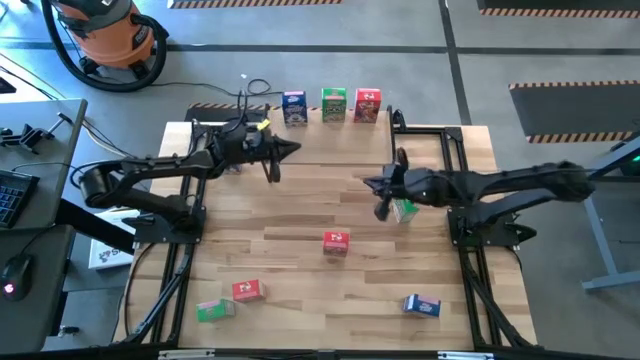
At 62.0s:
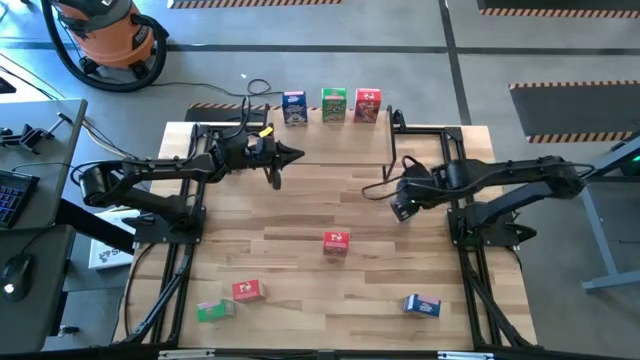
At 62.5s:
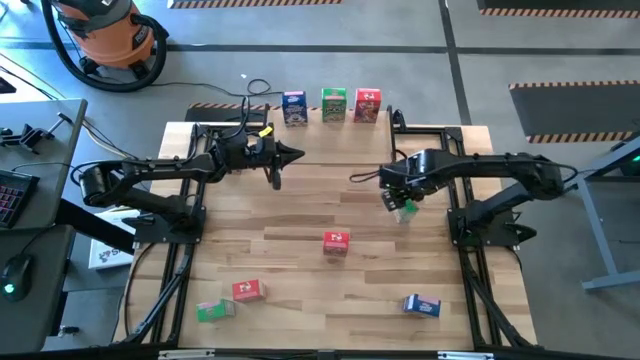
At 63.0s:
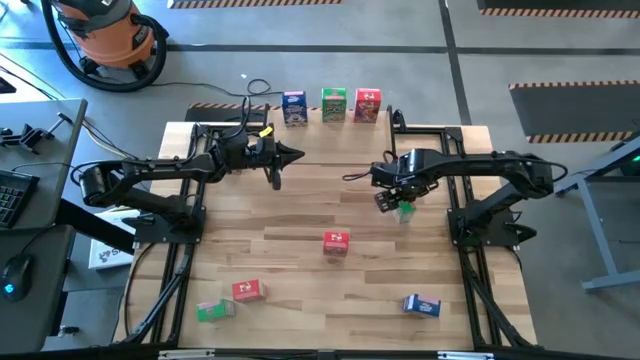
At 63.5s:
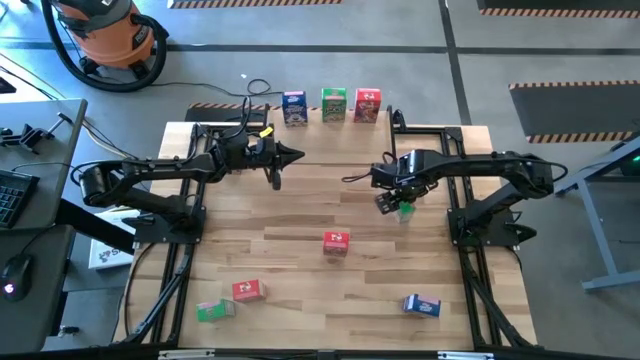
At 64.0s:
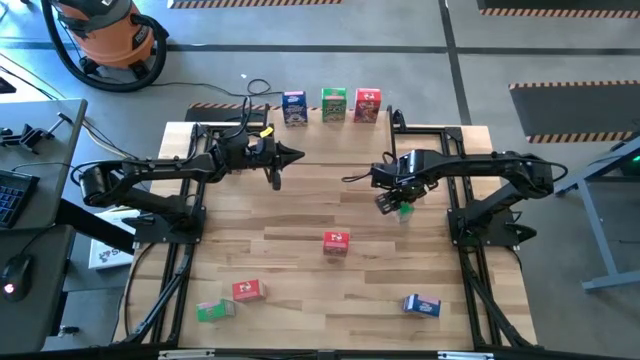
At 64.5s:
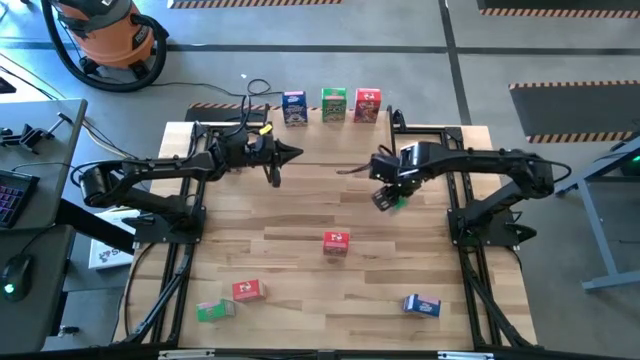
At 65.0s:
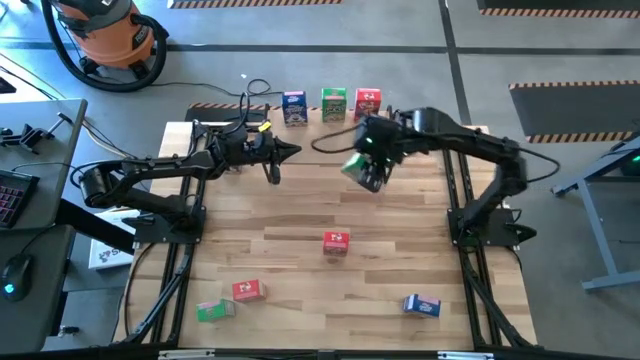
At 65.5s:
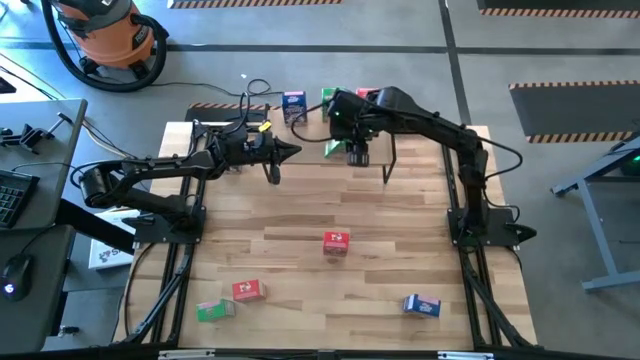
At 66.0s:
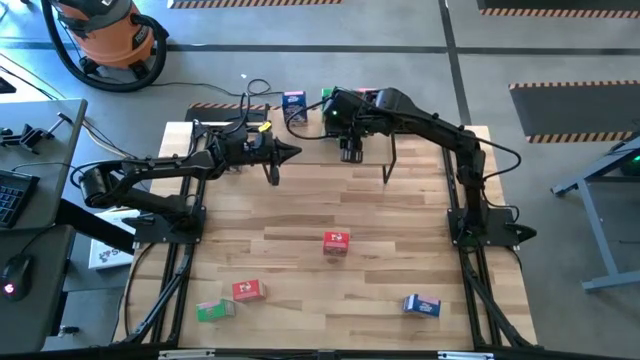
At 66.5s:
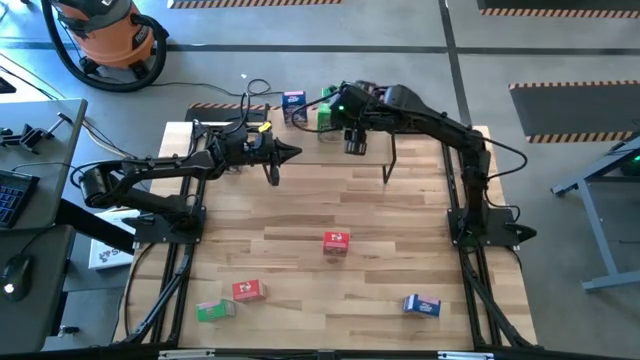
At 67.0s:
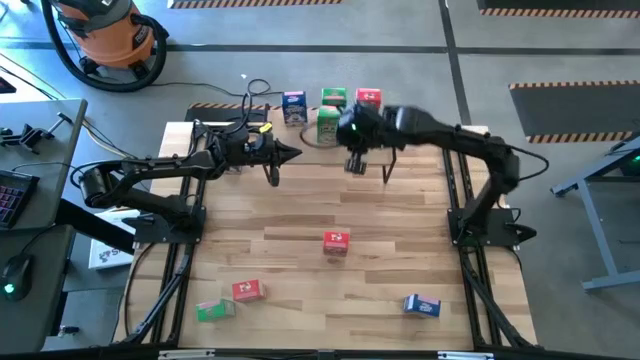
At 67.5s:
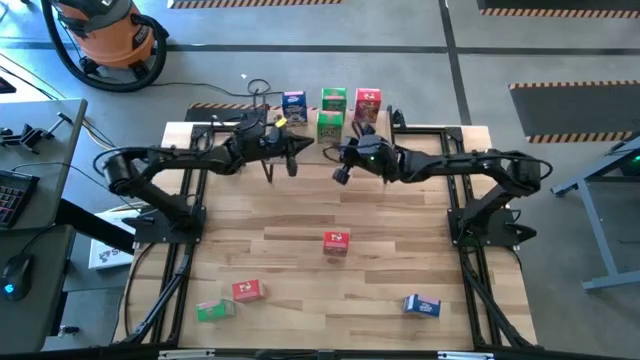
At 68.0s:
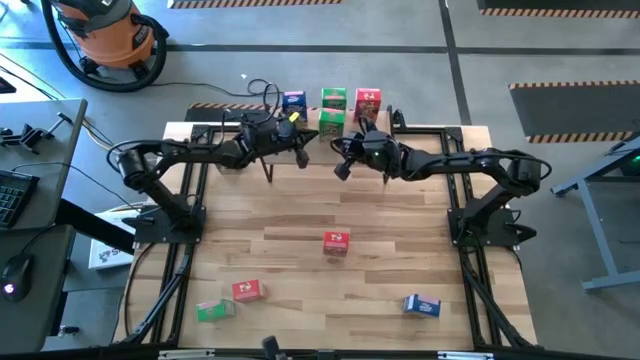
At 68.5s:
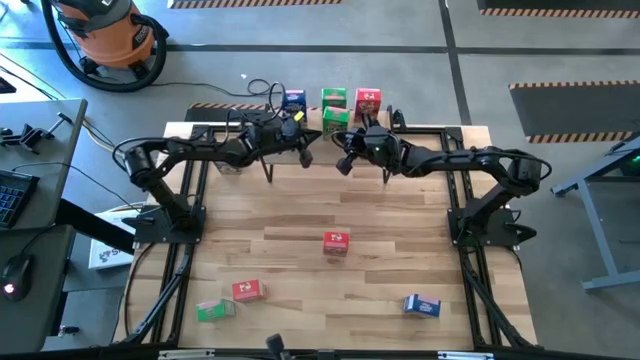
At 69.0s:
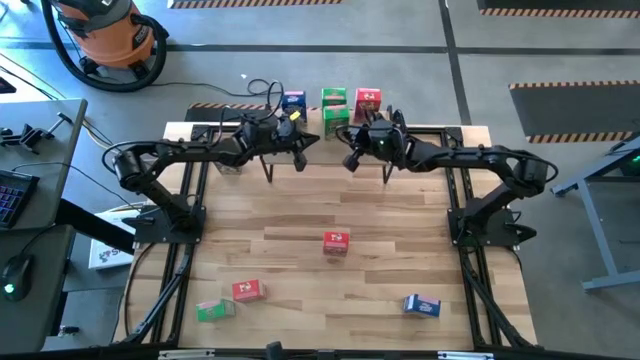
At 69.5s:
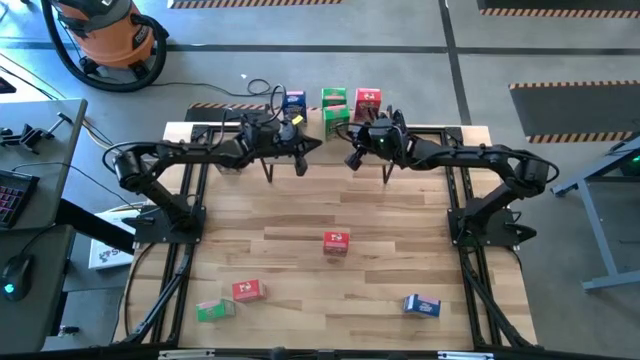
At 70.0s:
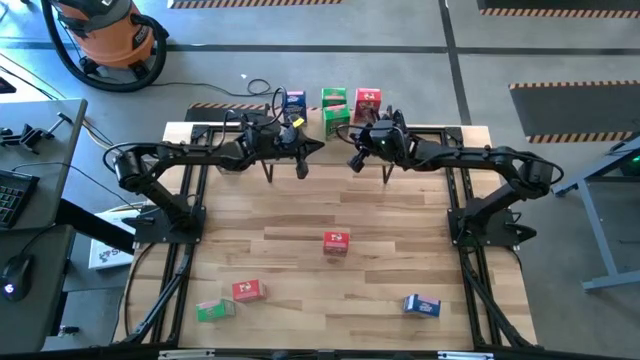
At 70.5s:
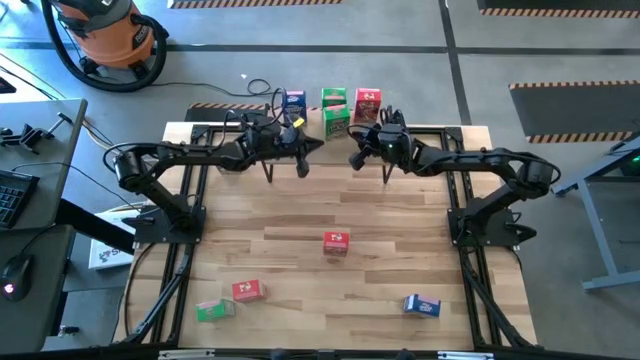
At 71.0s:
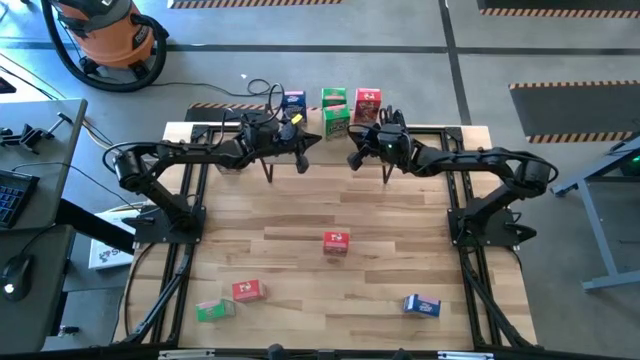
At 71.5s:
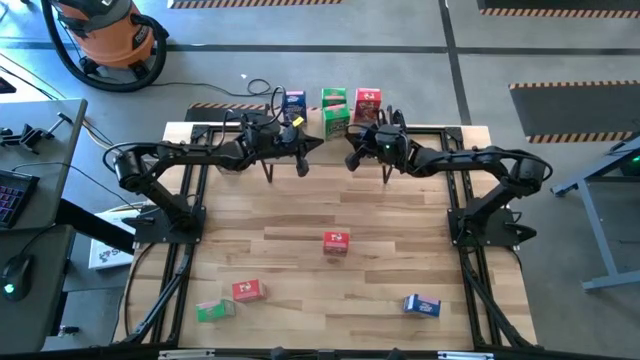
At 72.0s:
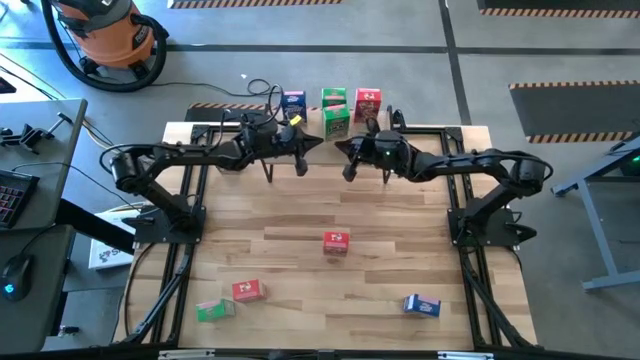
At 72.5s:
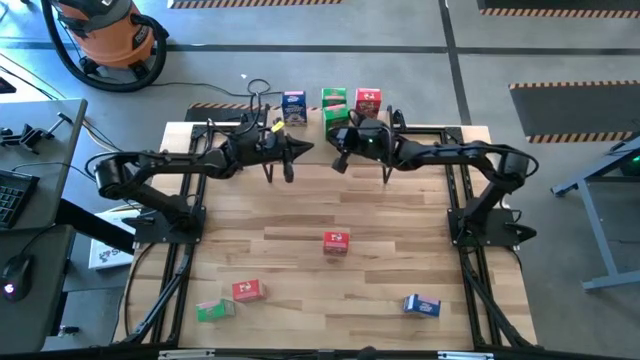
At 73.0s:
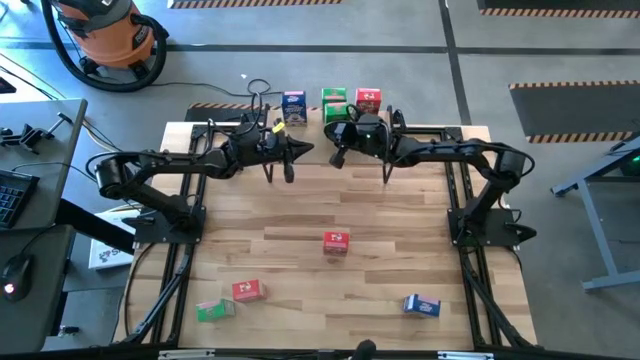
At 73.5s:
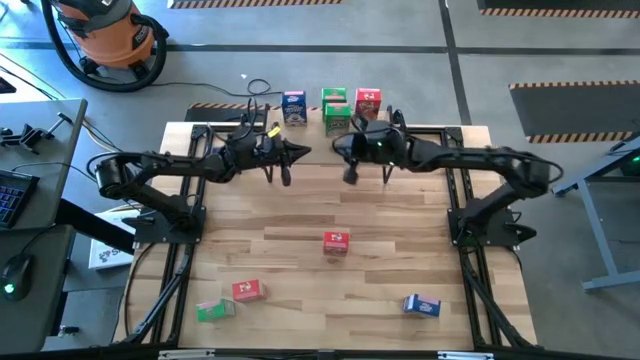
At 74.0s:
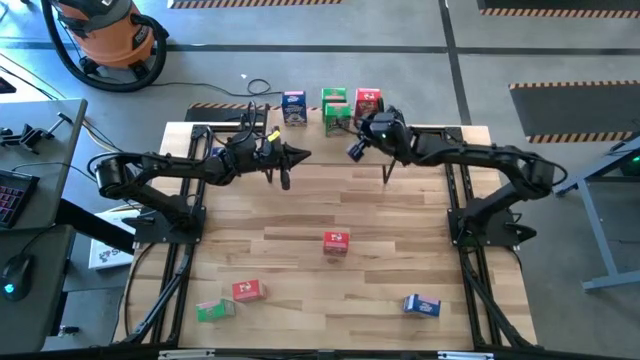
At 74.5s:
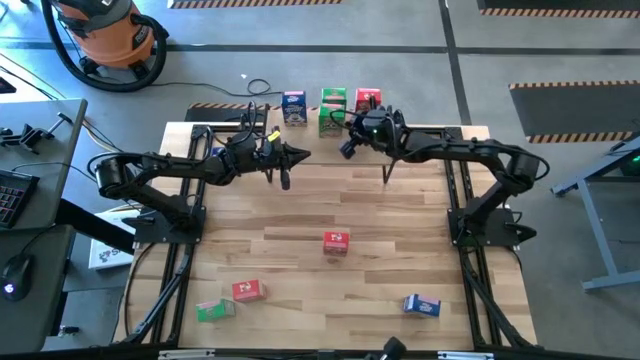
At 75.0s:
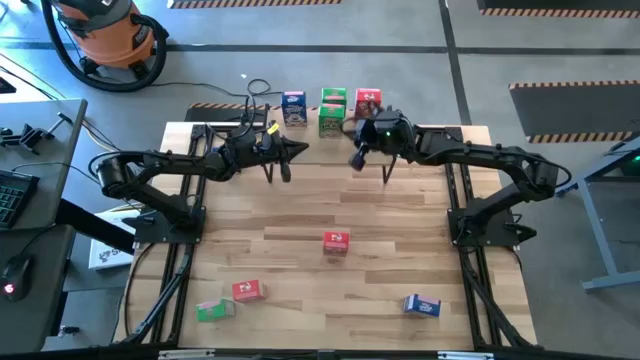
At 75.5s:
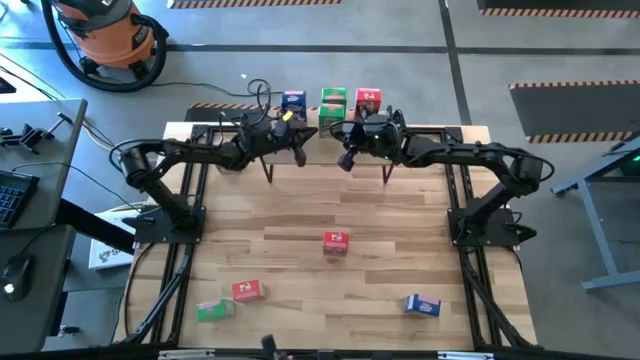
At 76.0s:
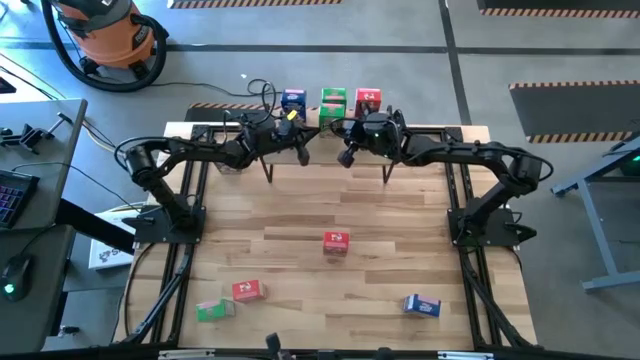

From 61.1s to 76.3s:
Task: Stack cereal on shelf
Adjust the bottom green cereal box on the shelf

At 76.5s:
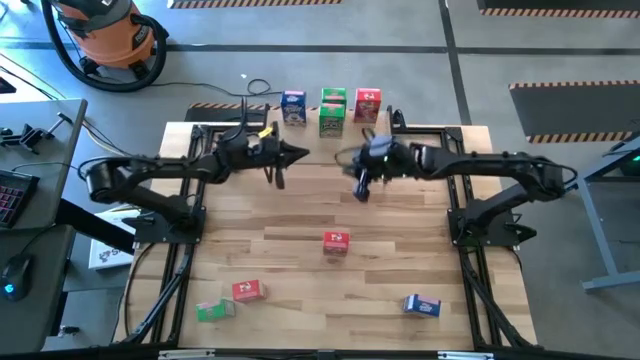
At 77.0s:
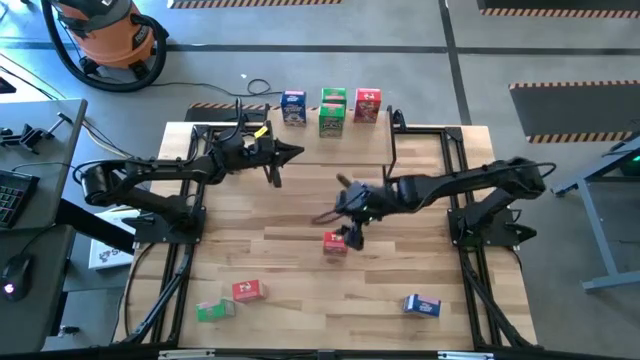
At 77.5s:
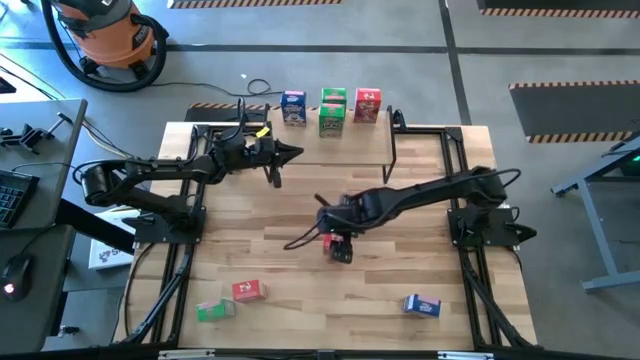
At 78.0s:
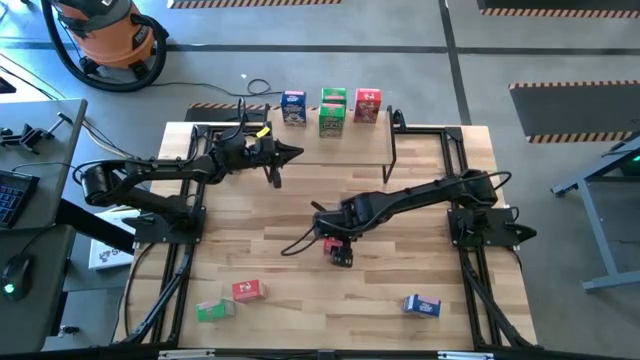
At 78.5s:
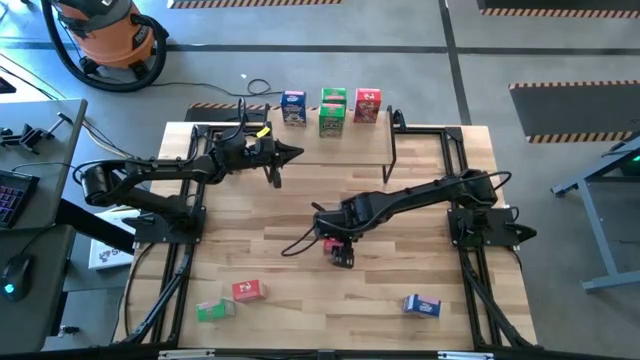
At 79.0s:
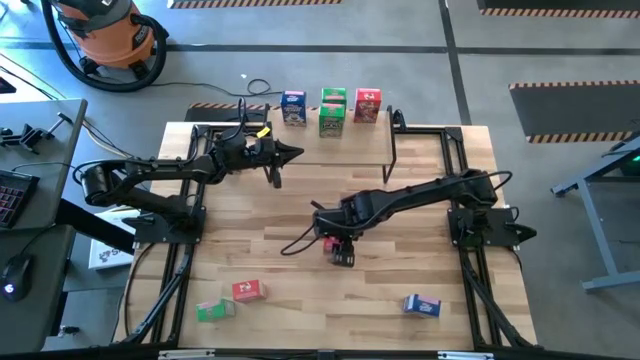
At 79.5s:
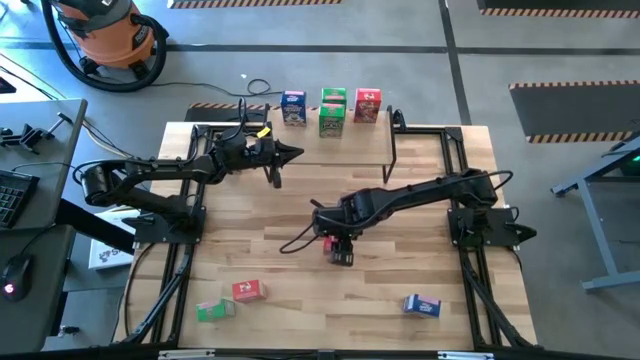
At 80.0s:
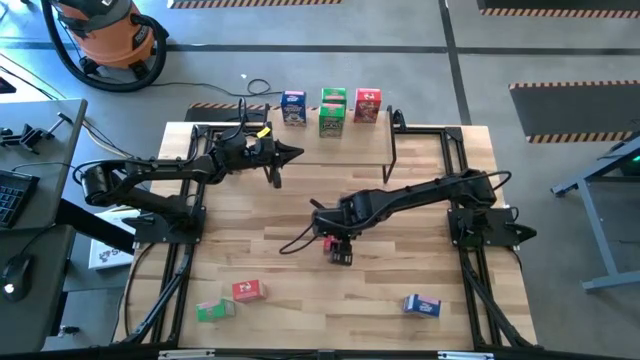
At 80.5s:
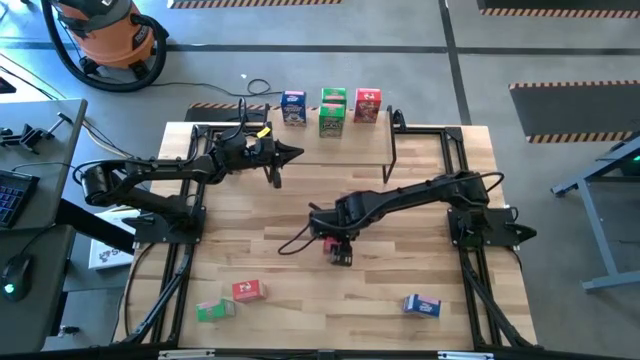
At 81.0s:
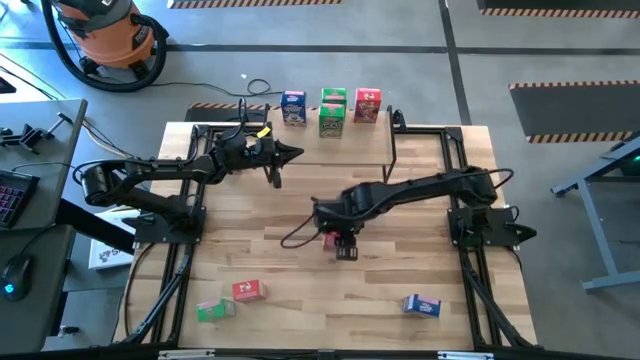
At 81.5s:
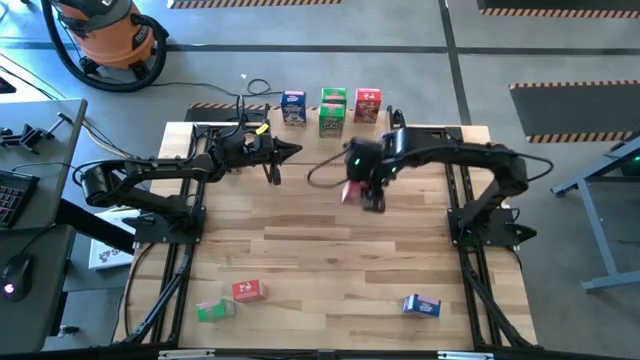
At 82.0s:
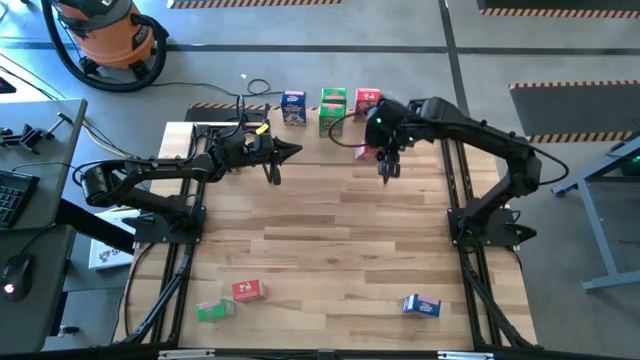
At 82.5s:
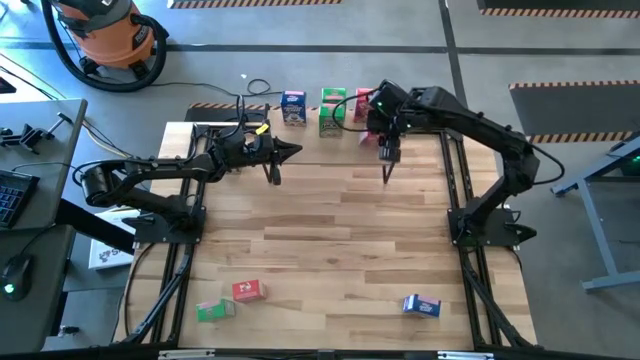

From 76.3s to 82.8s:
Put the right red cereal on the shelf aligned with the other red cereal box

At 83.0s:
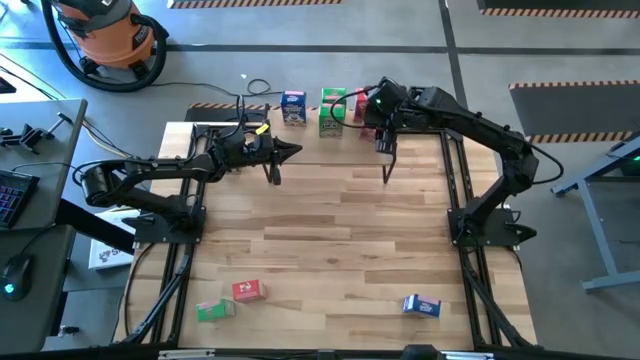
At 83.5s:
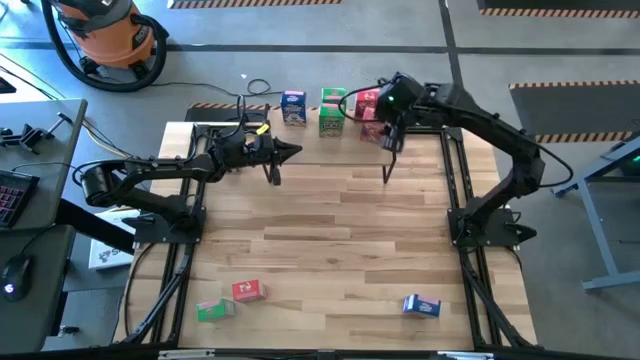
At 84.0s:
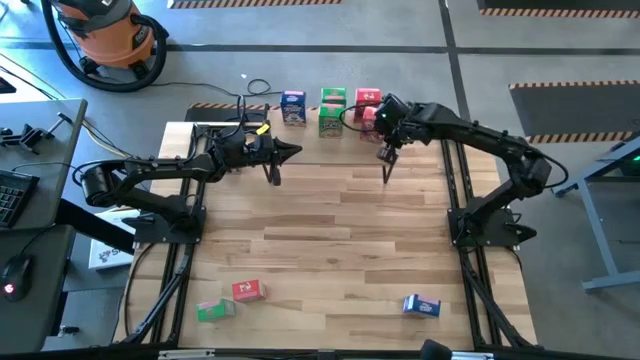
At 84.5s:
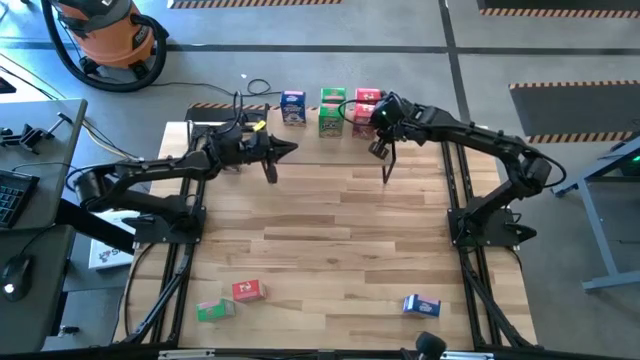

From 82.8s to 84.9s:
Adjust the bottom red cereal box on the shelf
